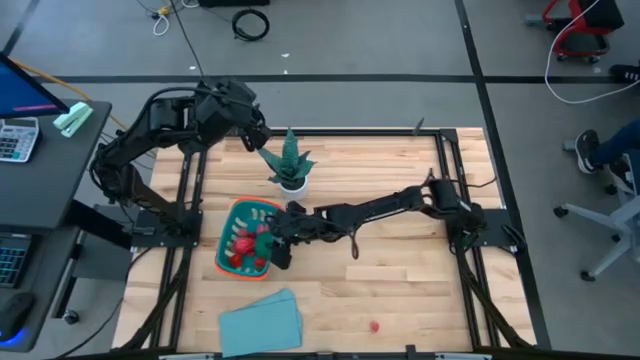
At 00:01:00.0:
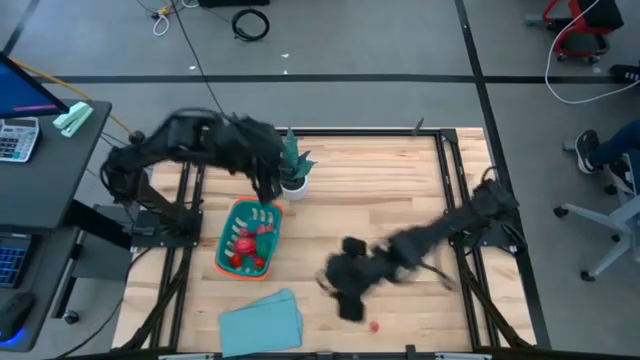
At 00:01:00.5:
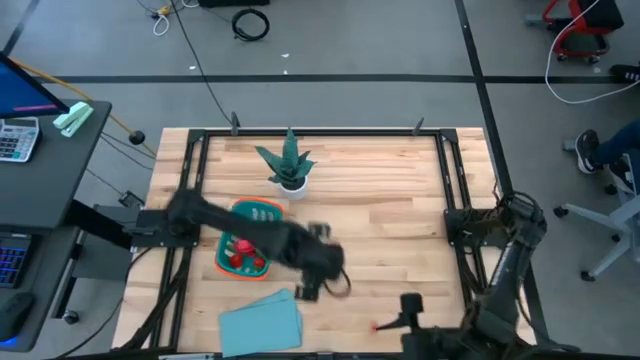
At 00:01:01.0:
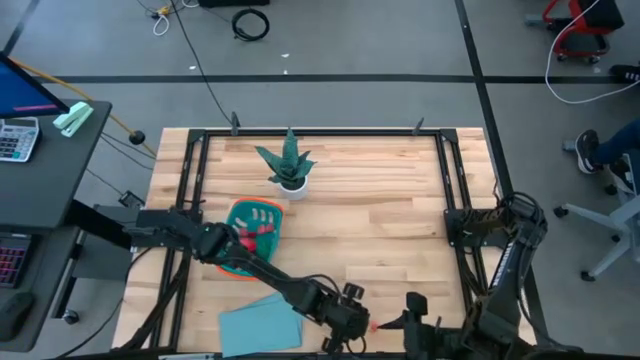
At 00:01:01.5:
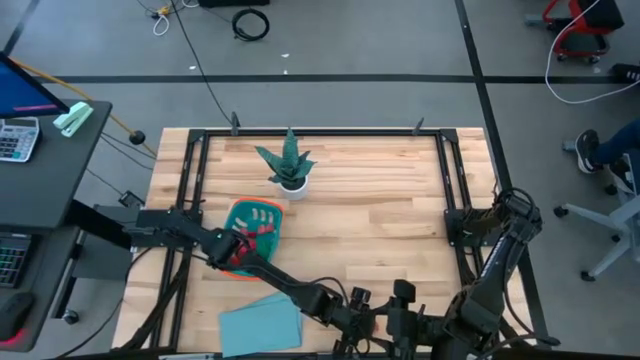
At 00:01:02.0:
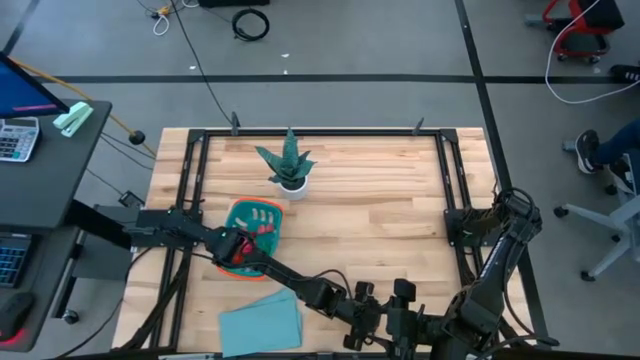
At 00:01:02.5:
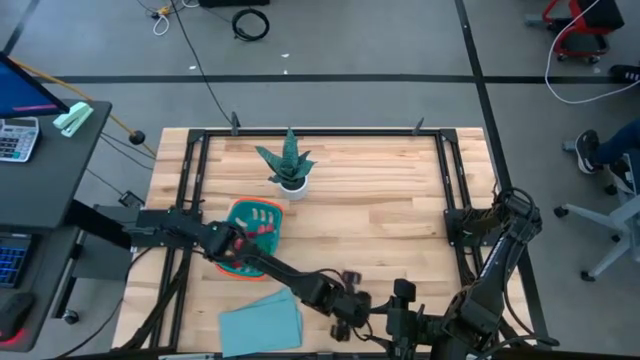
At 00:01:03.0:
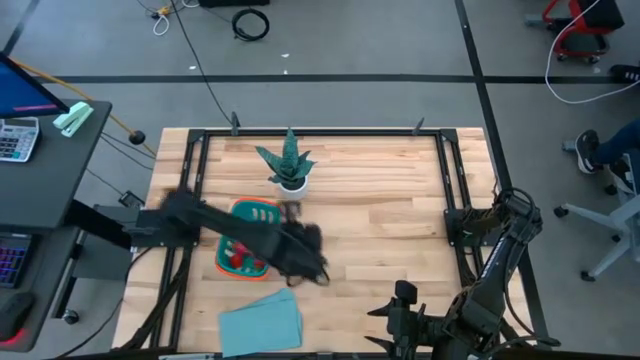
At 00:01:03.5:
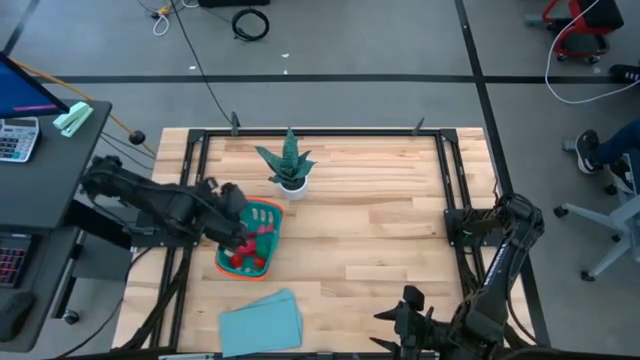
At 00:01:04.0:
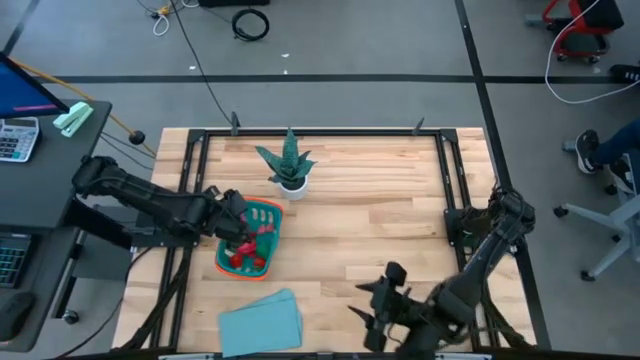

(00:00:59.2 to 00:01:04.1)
Task: Pick and placing Produce into tupperware
Put the pink peach into the blue basket

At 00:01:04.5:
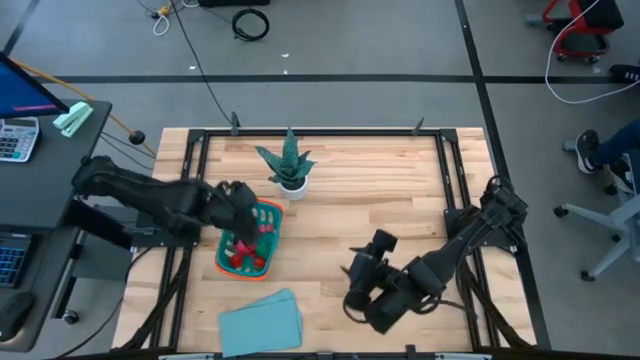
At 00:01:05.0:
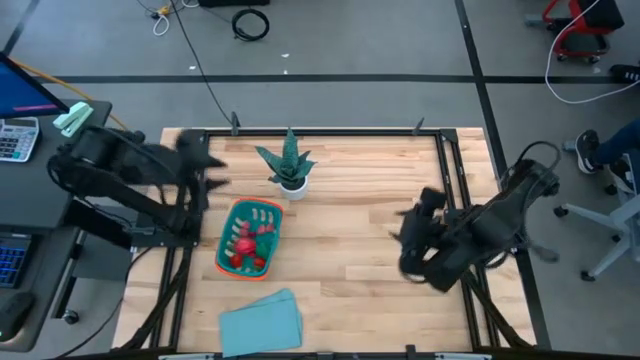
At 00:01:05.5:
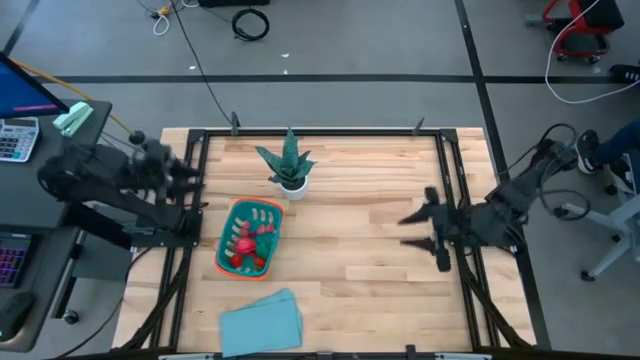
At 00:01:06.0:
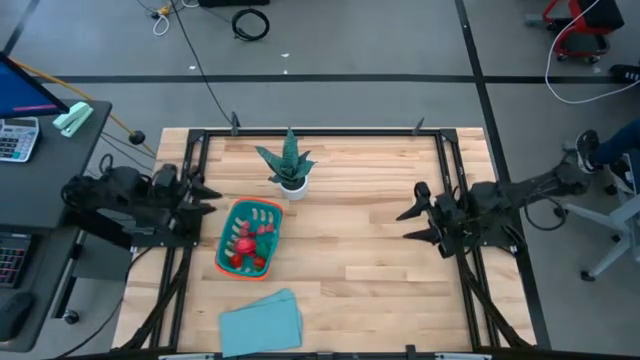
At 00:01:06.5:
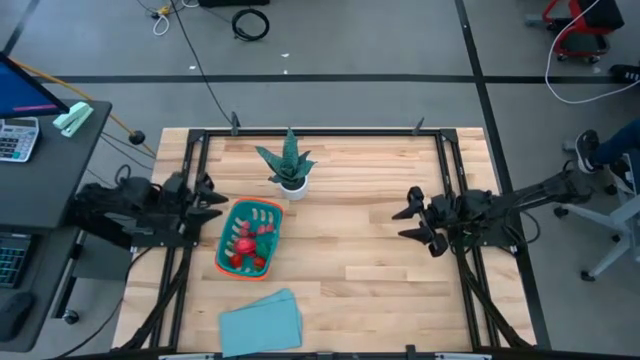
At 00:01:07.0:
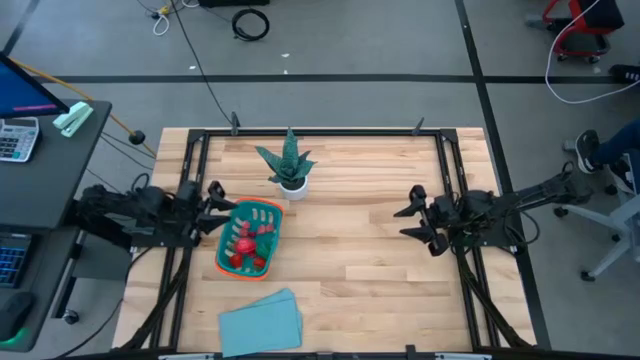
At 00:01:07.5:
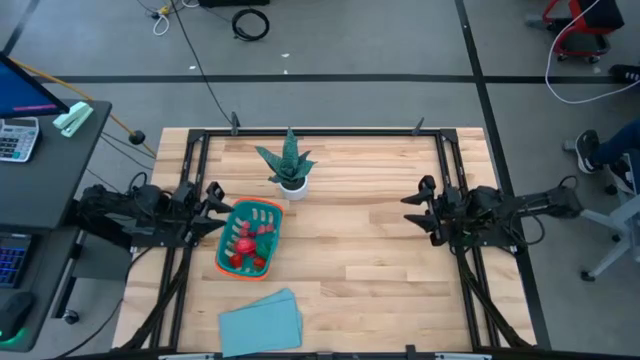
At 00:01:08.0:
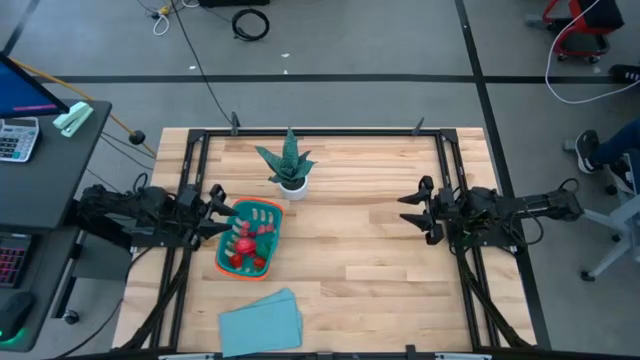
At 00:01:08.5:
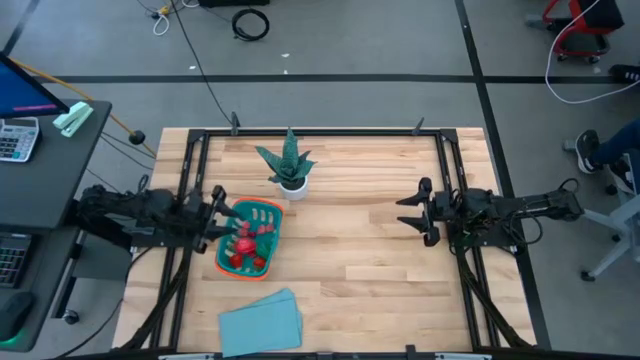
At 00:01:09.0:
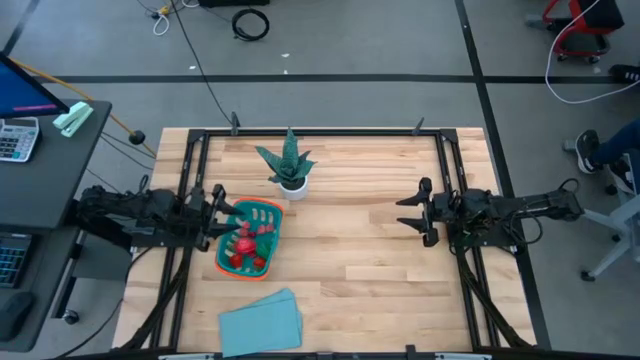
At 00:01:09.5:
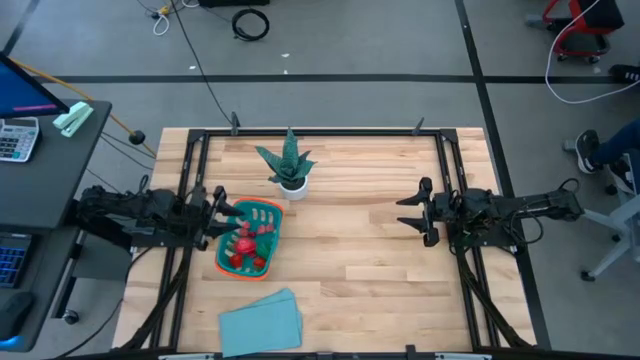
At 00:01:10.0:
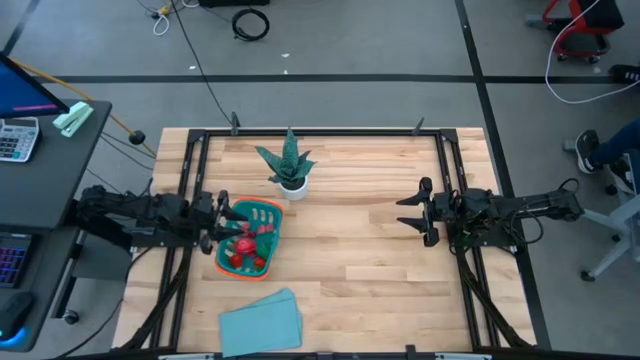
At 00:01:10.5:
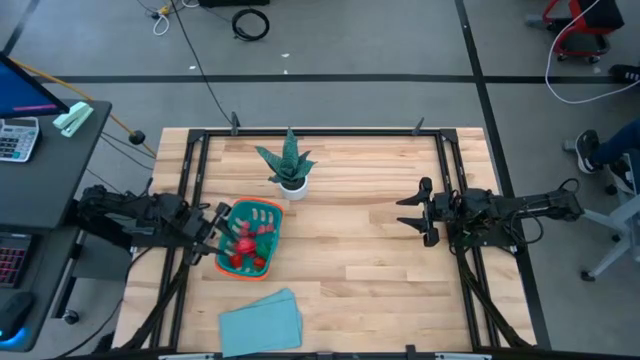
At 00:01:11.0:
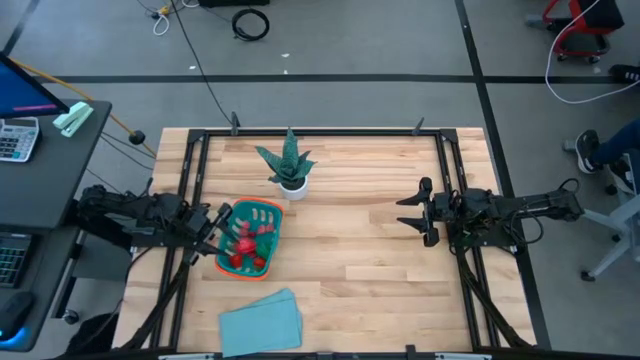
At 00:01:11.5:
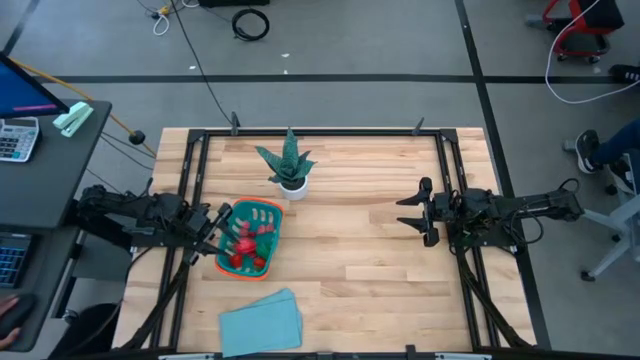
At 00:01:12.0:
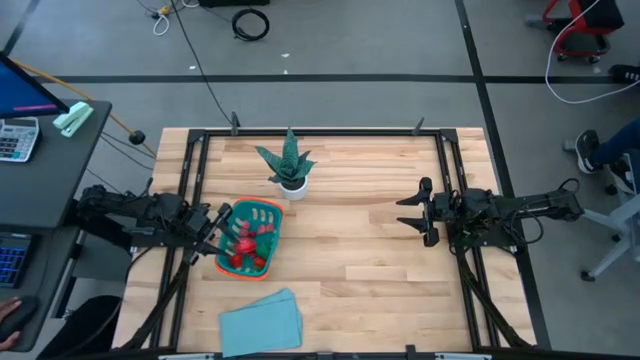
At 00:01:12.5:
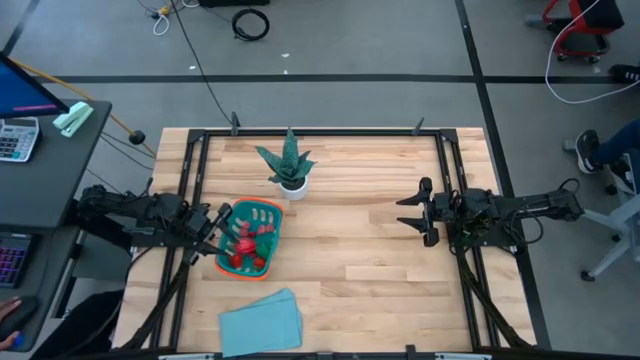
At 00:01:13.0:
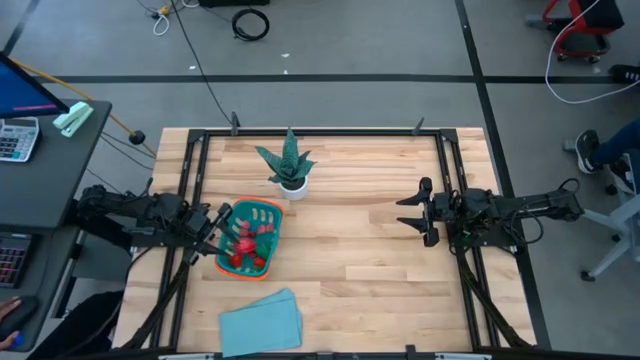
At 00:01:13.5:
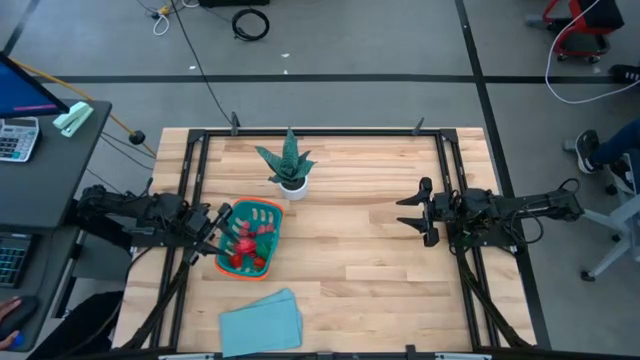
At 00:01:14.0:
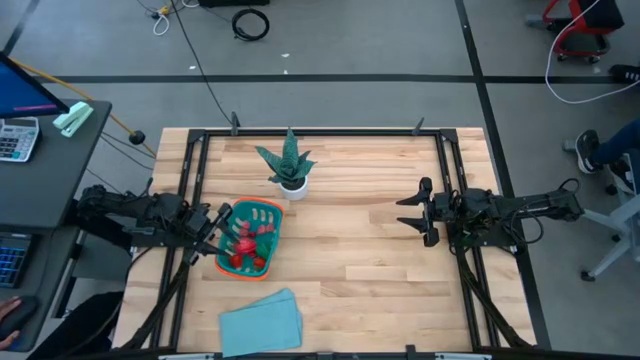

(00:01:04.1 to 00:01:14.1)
Return to Home Position

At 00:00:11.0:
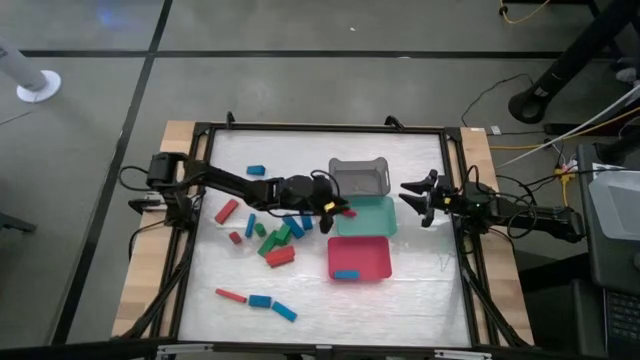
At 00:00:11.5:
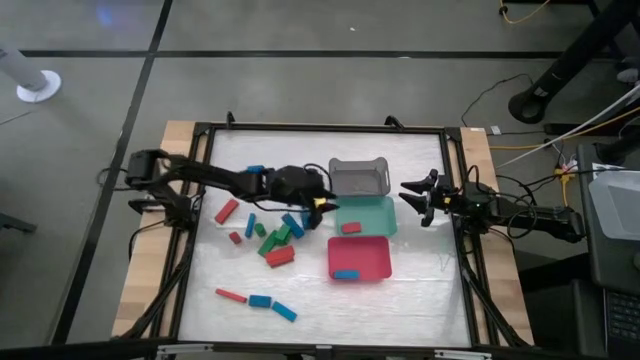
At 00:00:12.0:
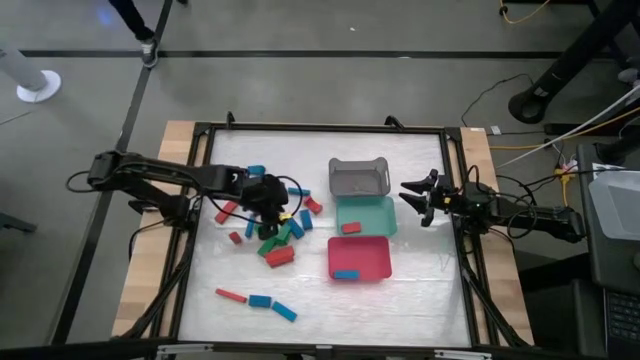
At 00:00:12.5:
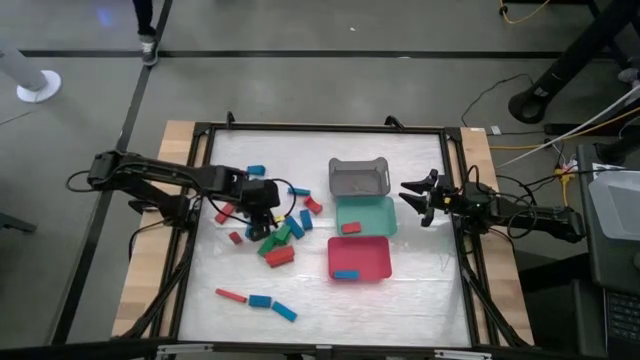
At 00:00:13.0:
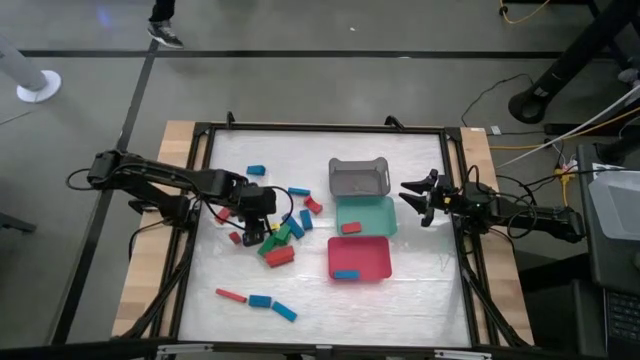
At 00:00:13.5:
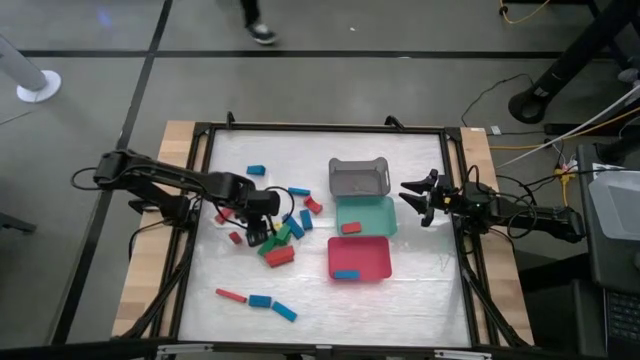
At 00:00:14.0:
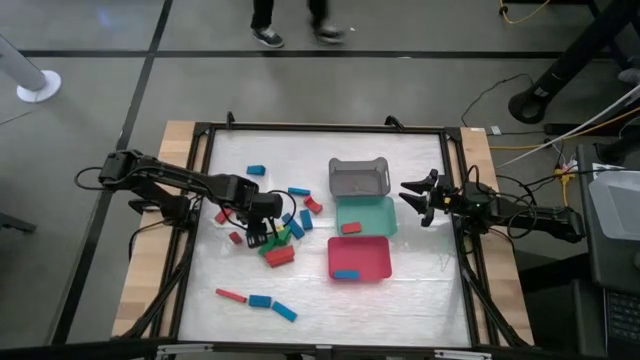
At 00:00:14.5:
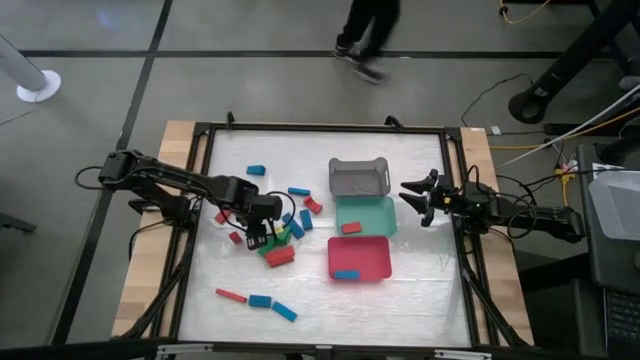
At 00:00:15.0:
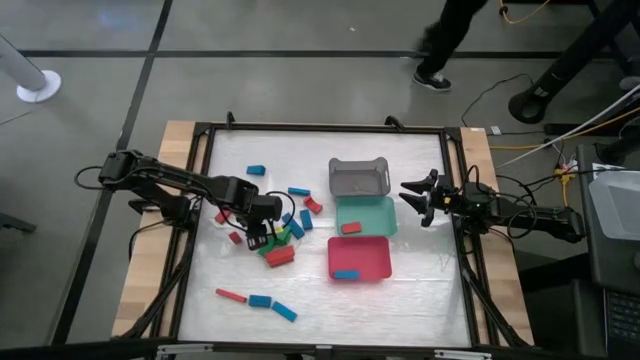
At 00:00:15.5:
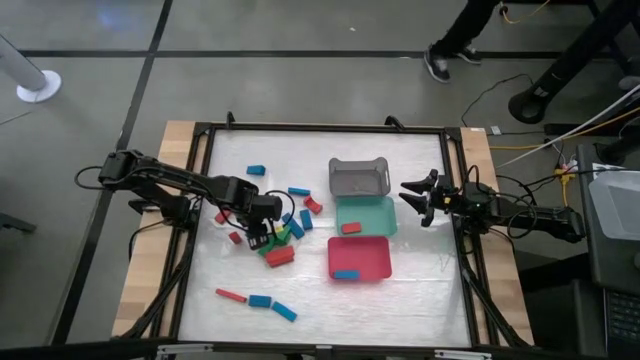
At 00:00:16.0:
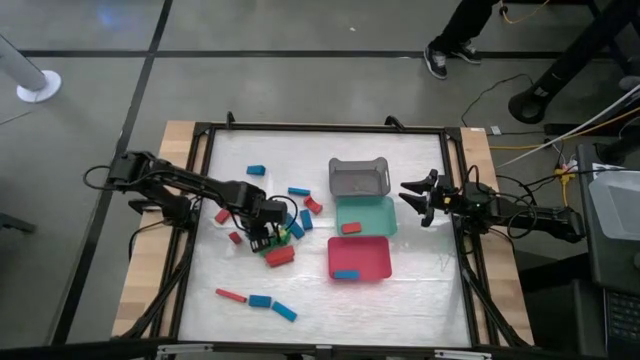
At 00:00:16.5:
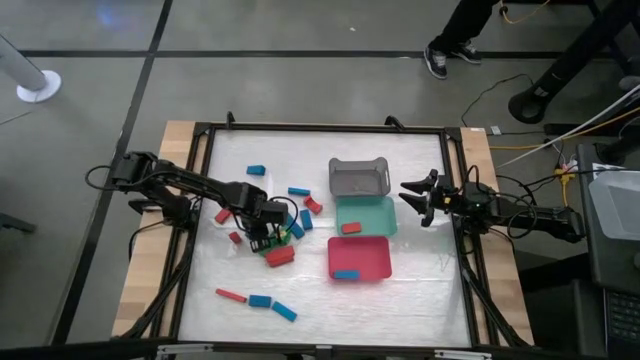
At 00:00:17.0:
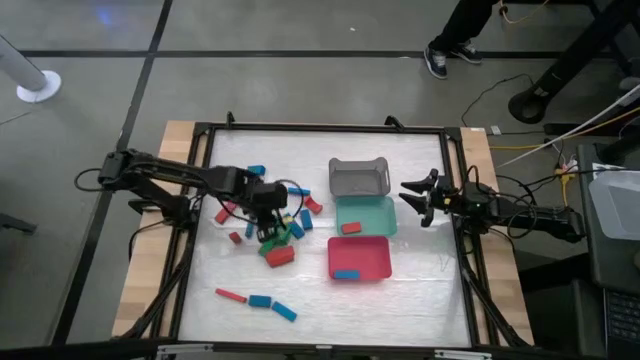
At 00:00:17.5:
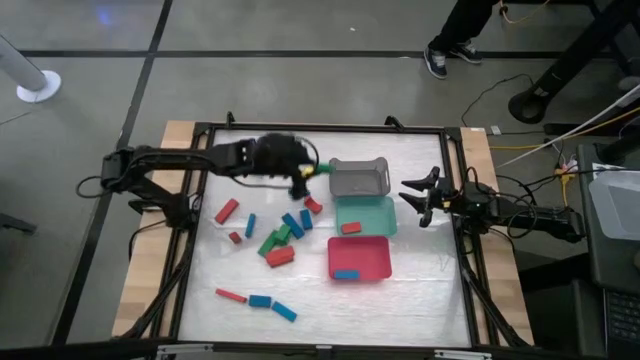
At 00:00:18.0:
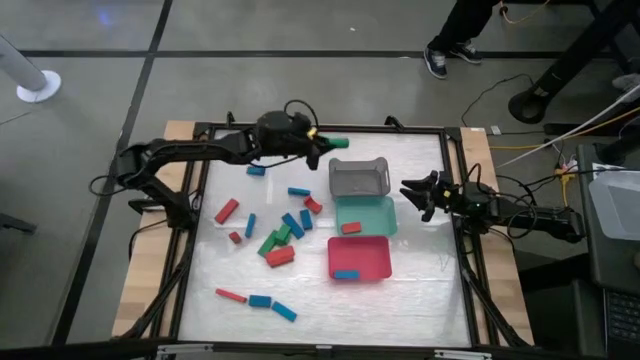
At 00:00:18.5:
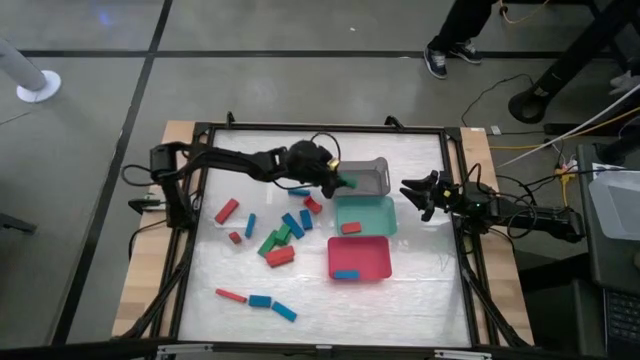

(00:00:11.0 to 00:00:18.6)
Task: Sort blocks
Put the green block into the black bin
